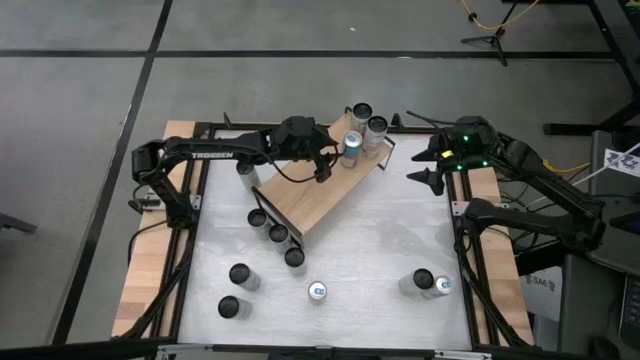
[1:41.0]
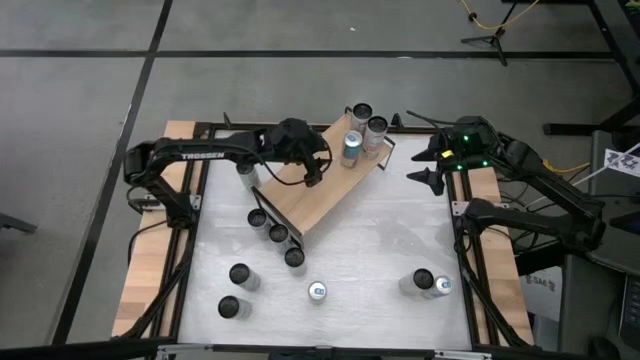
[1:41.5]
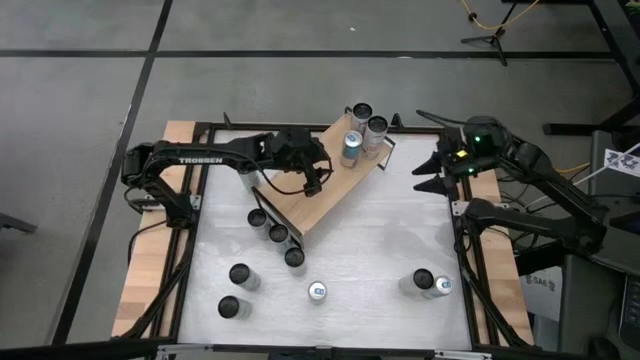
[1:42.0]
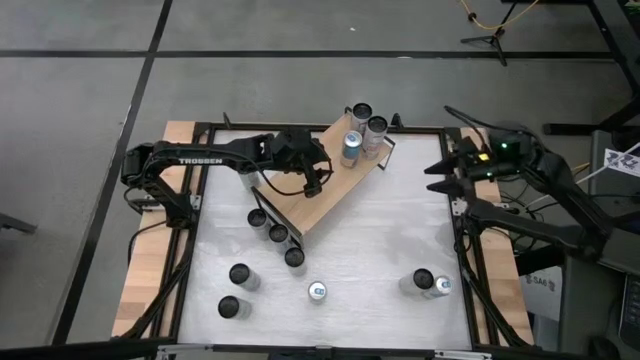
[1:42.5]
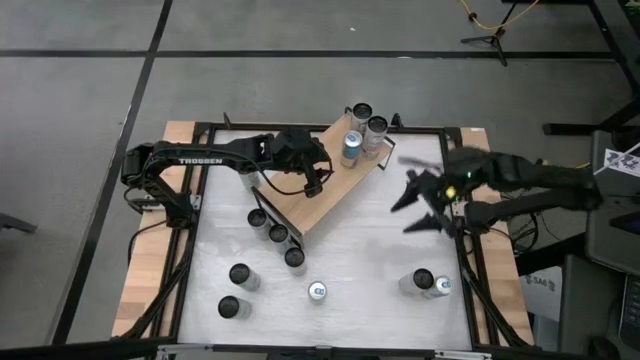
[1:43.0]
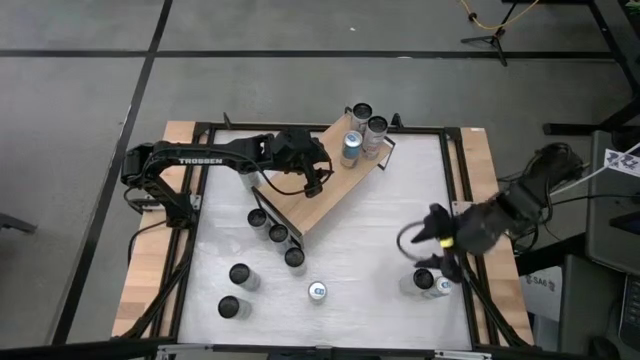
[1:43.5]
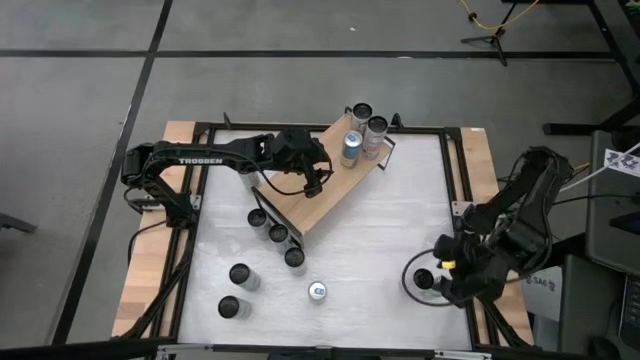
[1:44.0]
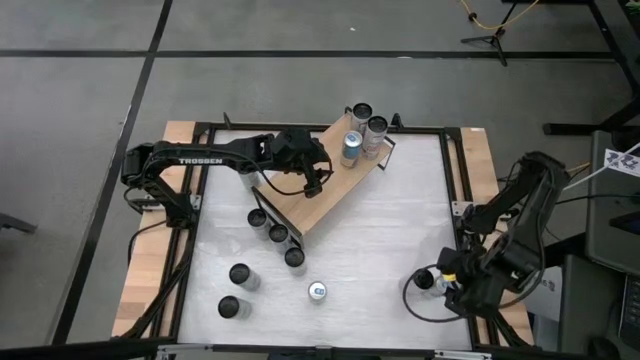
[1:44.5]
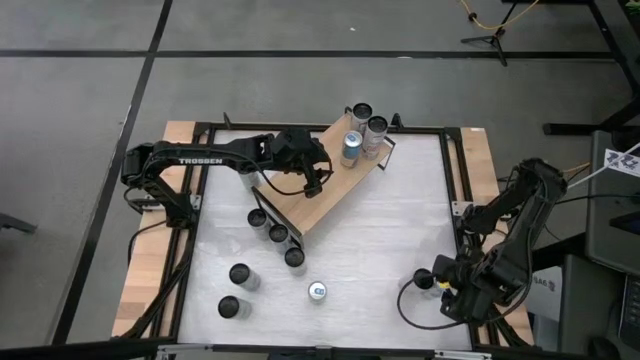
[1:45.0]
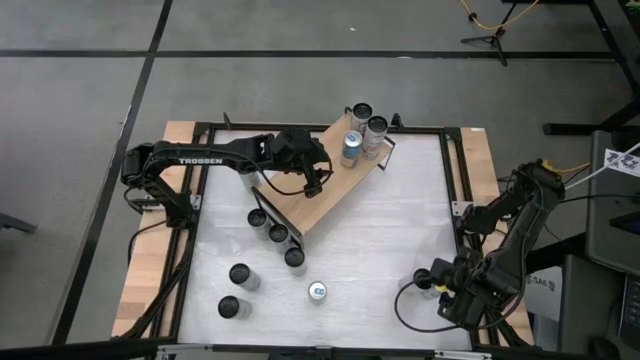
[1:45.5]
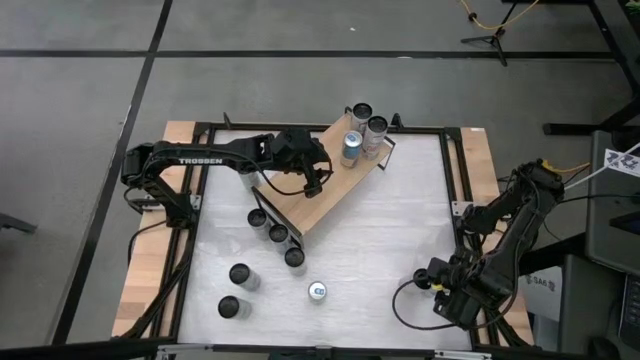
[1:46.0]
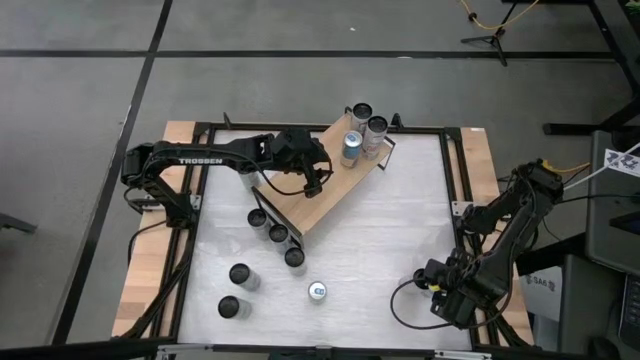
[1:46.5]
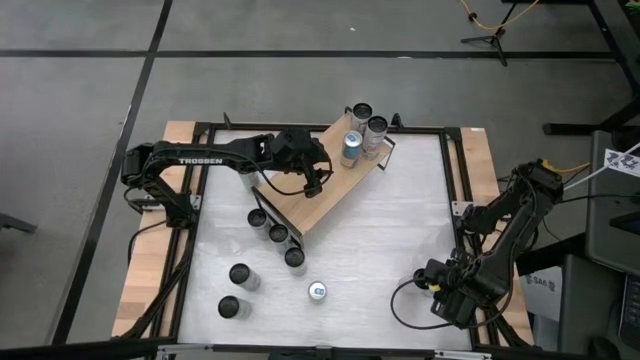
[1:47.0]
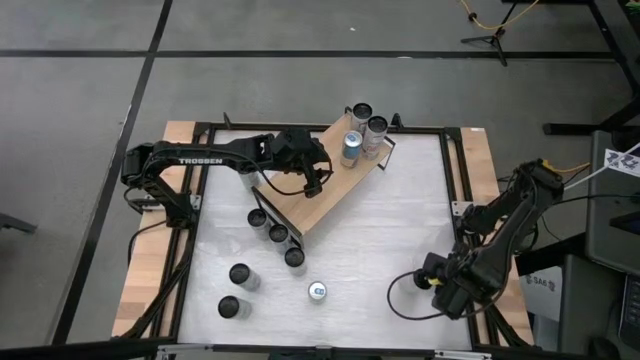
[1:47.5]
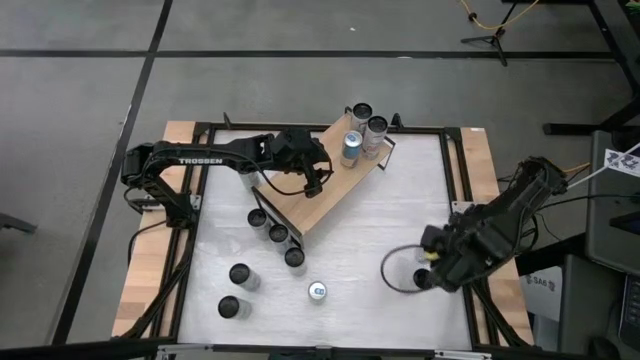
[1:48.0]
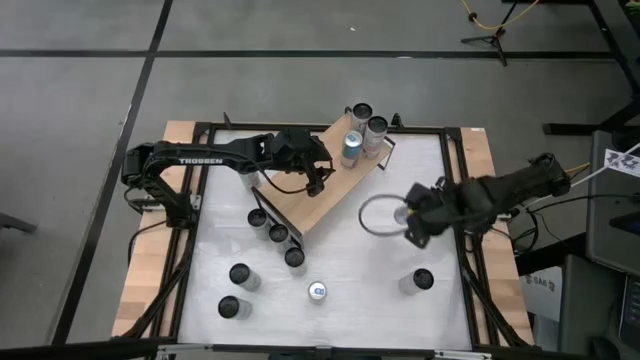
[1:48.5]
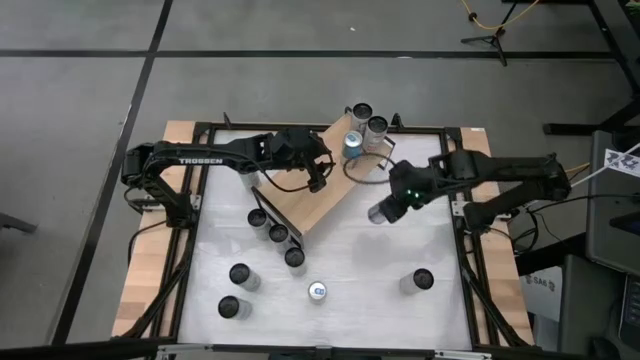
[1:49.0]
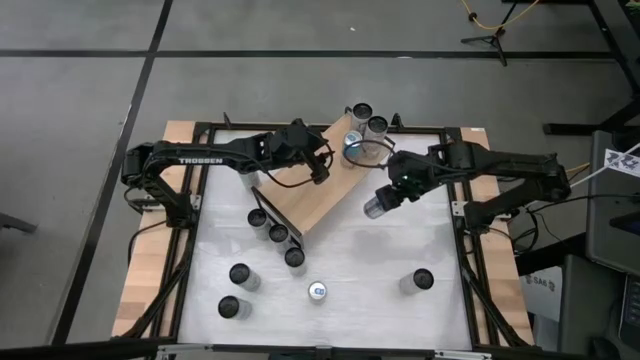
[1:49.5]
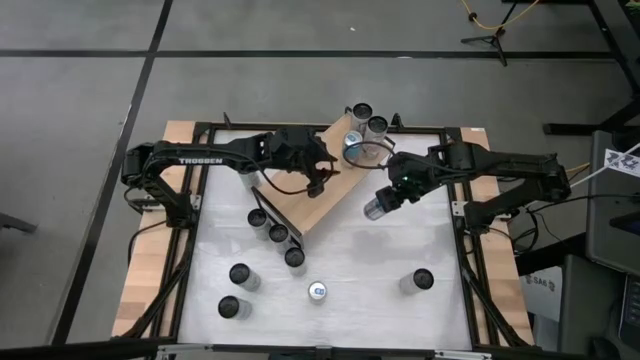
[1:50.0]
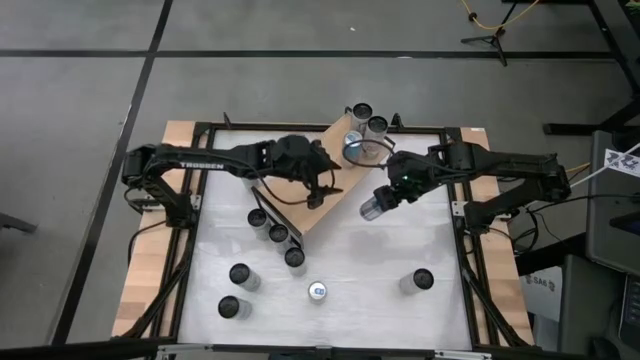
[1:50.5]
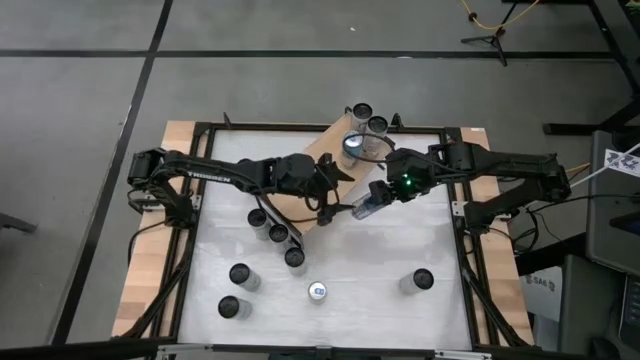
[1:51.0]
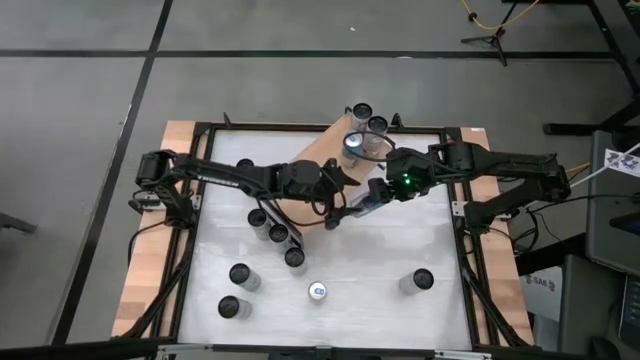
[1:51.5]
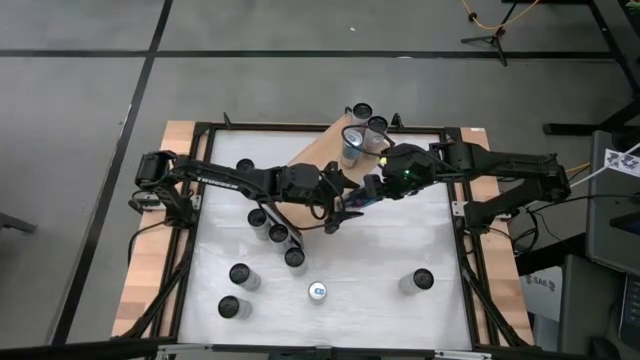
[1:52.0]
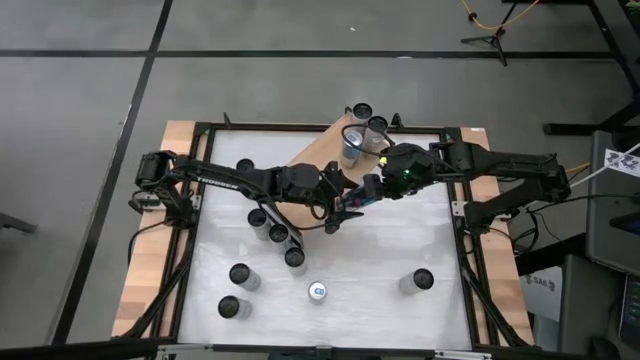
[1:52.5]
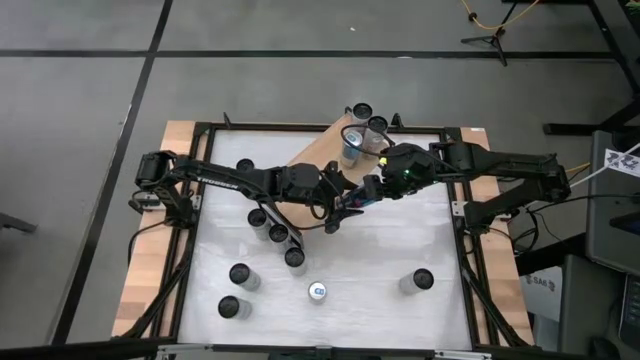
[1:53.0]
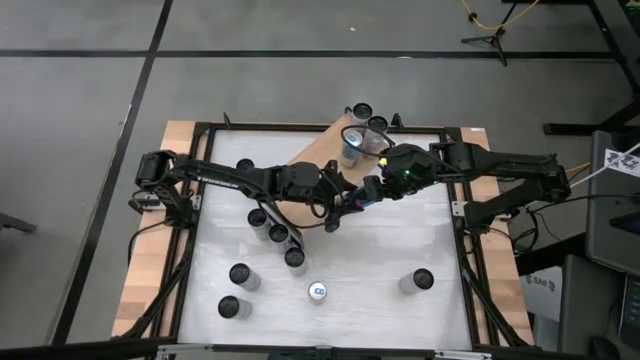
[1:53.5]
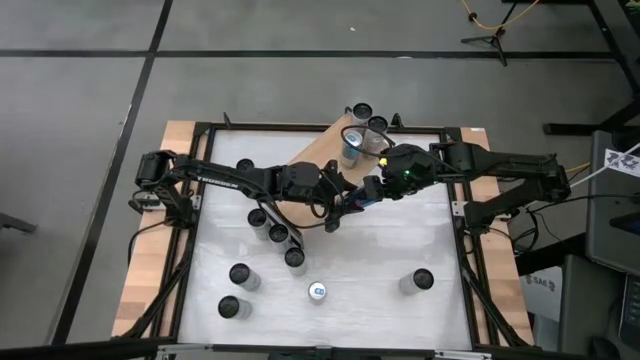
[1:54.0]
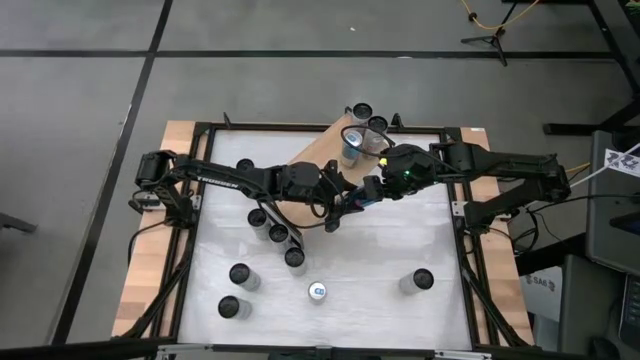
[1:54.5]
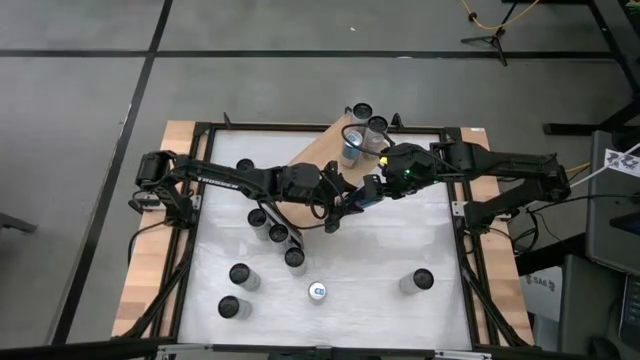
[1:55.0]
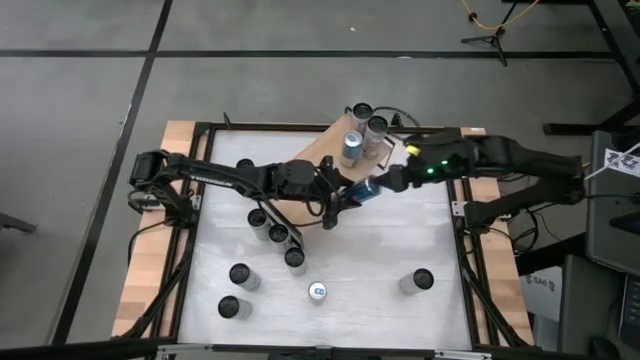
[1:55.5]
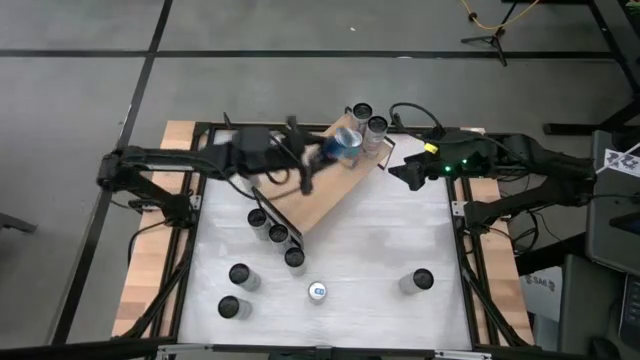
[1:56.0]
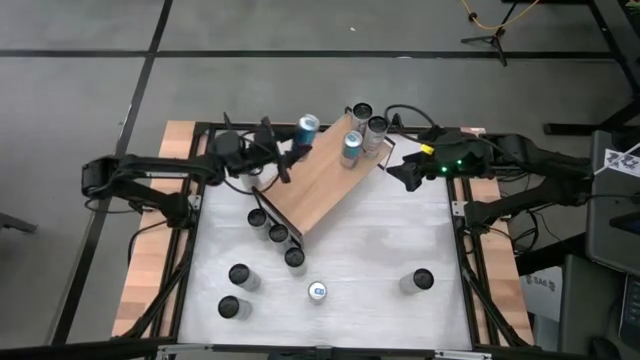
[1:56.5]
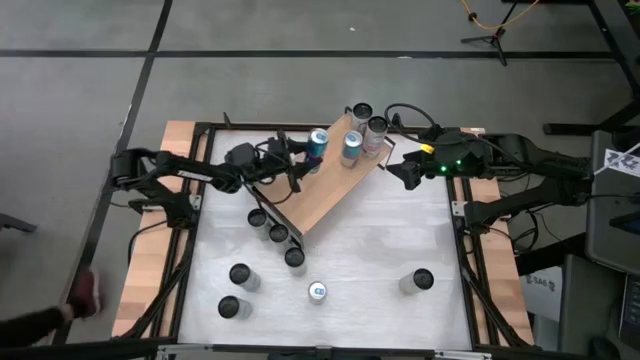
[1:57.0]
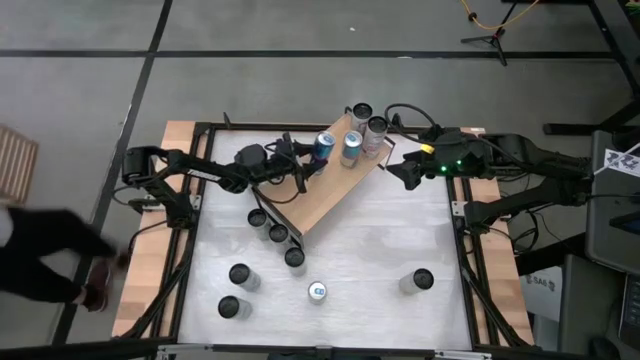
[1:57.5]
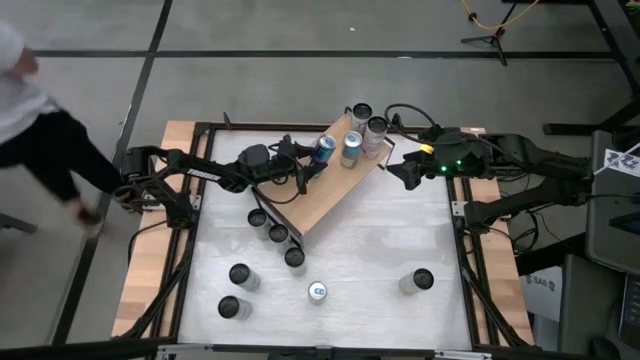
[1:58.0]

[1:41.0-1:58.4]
Task: Place canned beverage on shelf
Put the blue soda can on the shelf aligned with the other blue soda can

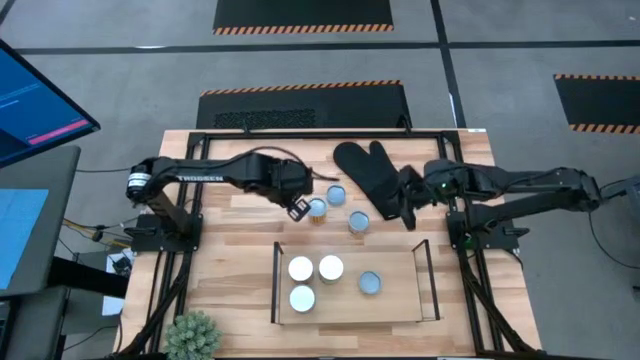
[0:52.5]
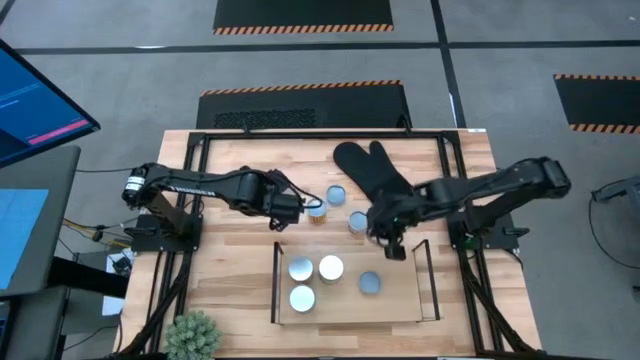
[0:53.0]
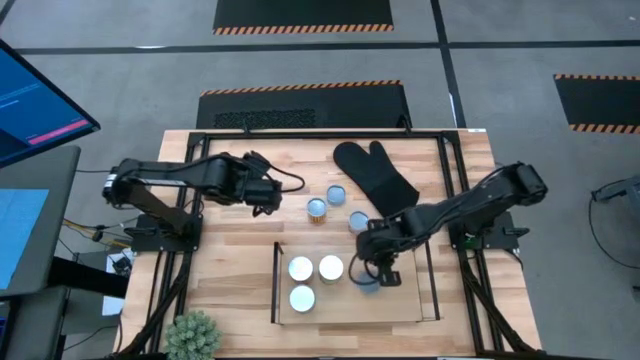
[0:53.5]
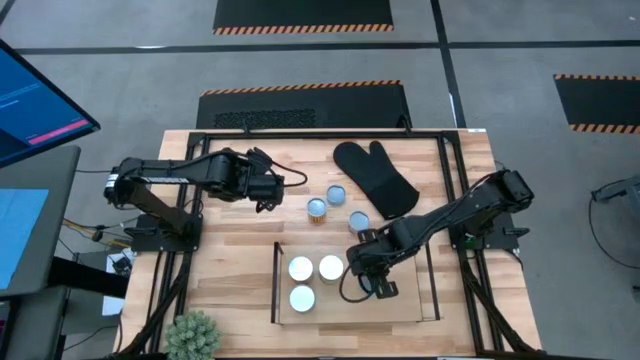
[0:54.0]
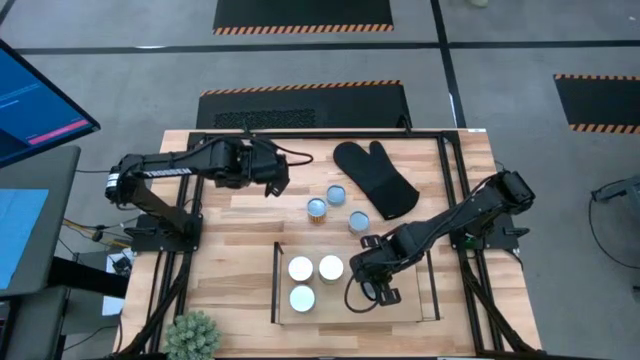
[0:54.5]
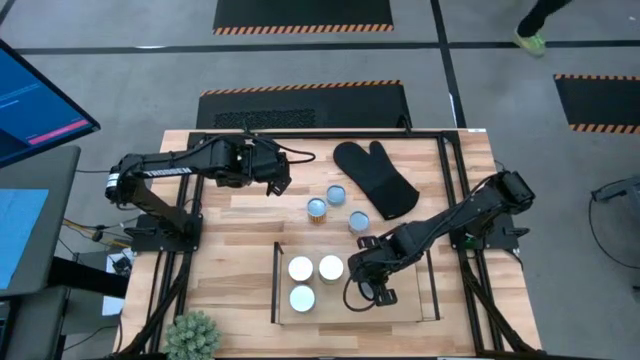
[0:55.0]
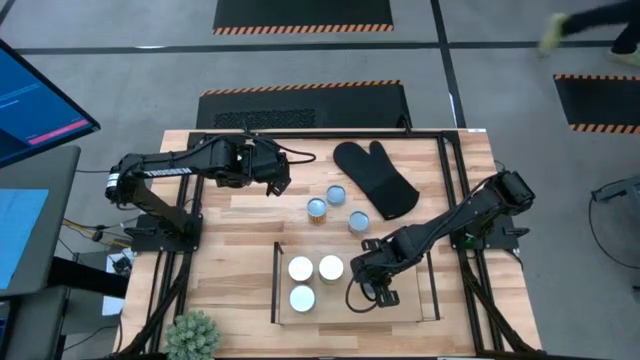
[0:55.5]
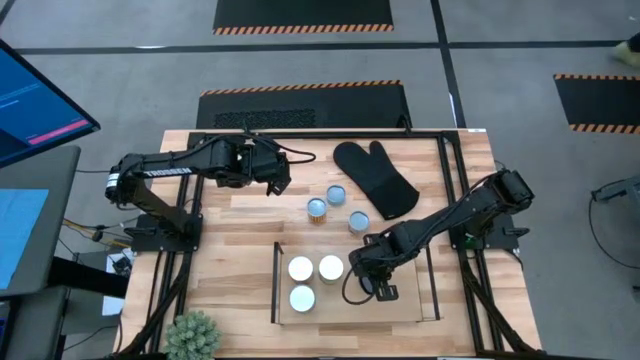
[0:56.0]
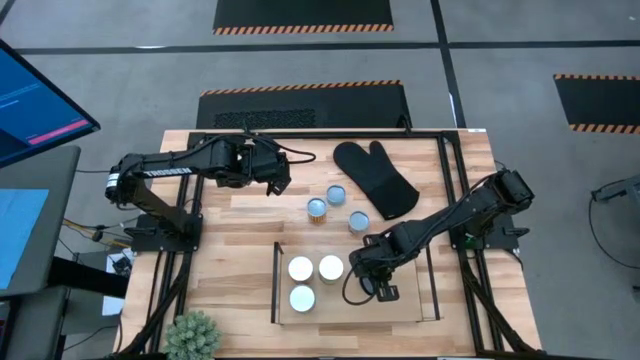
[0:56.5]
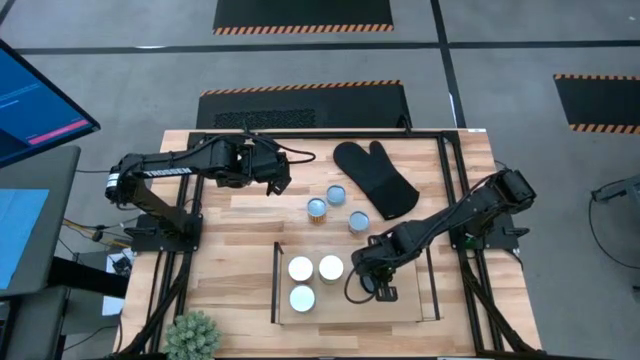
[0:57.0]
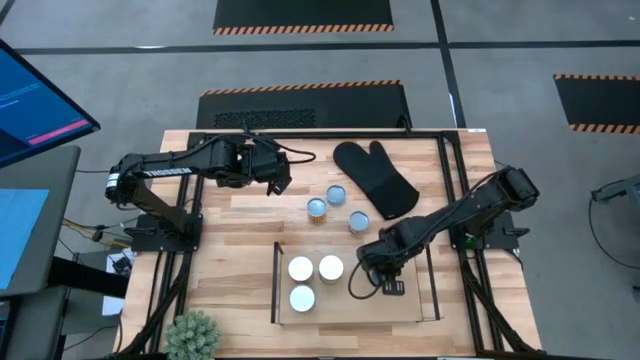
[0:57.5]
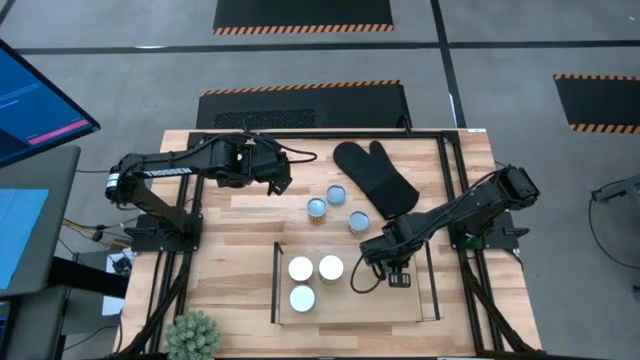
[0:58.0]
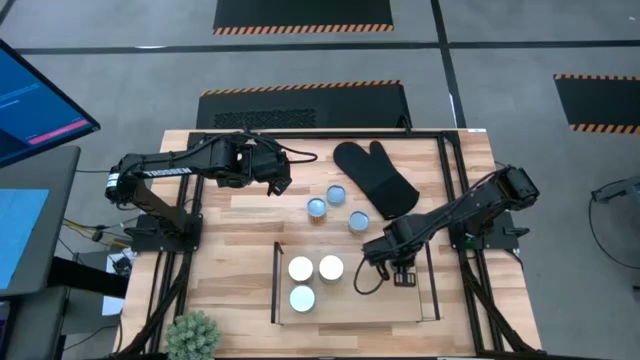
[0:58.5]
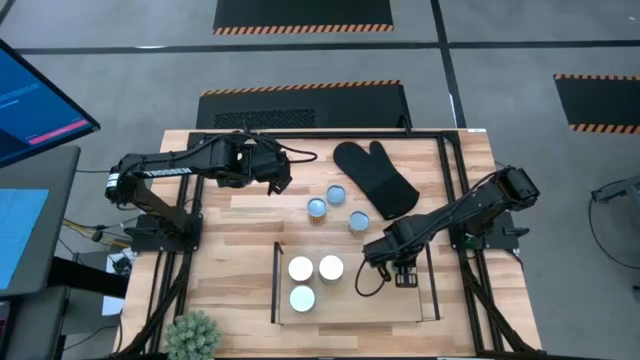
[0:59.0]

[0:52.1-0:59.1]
Task: Pick and place cans onto a shelf
Adjust the canned mushroom on the shelf
